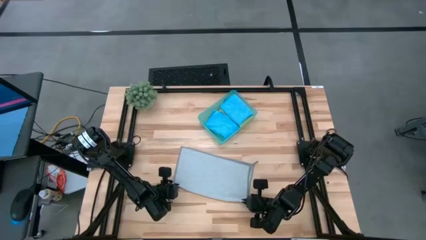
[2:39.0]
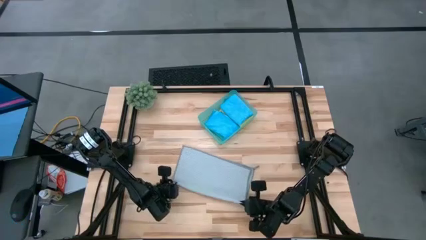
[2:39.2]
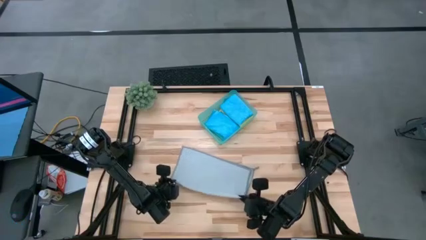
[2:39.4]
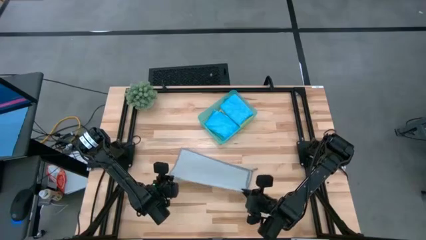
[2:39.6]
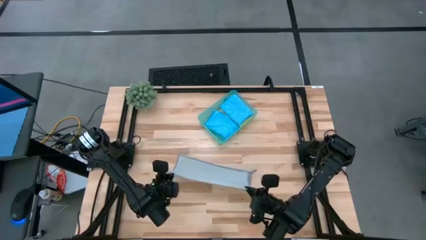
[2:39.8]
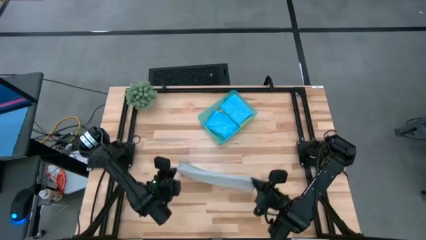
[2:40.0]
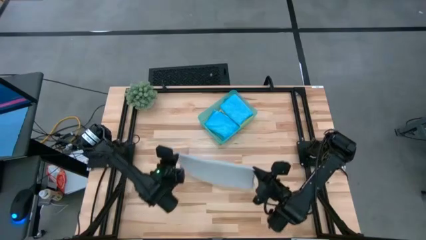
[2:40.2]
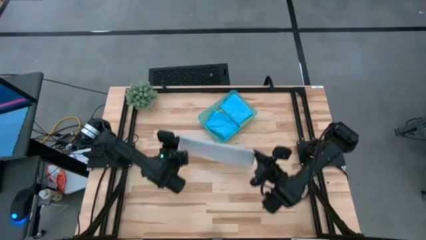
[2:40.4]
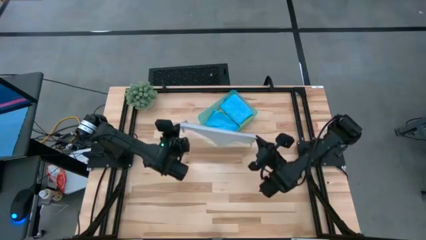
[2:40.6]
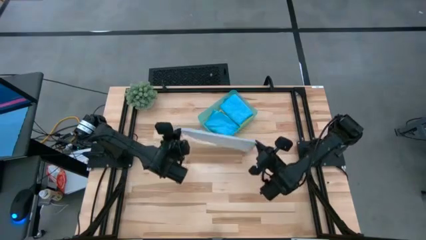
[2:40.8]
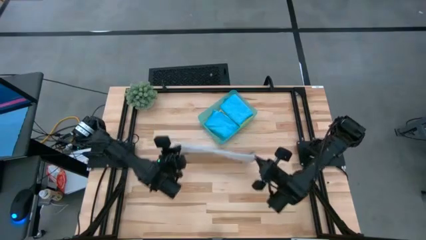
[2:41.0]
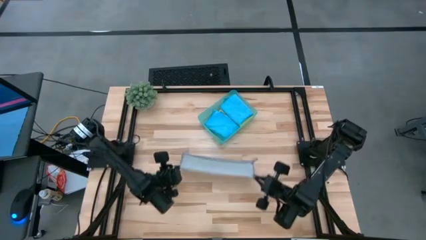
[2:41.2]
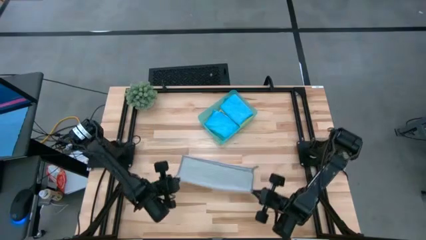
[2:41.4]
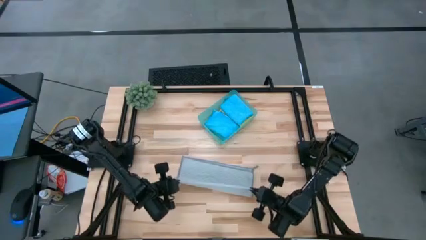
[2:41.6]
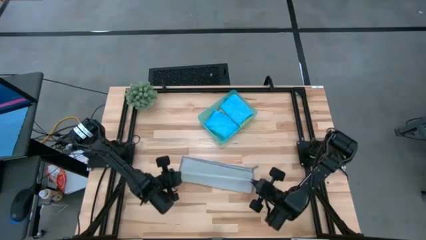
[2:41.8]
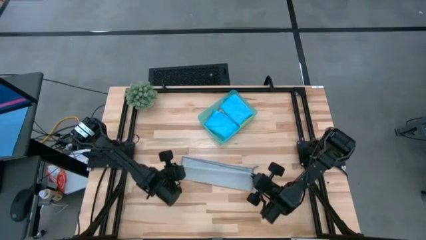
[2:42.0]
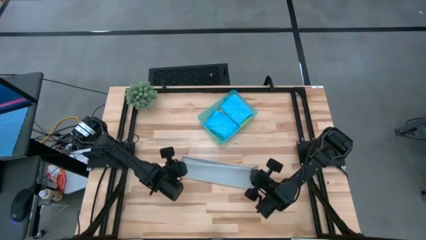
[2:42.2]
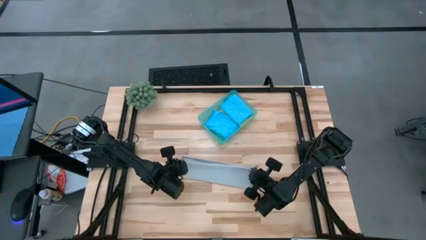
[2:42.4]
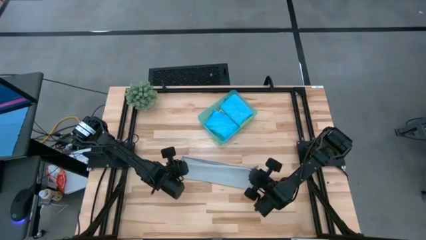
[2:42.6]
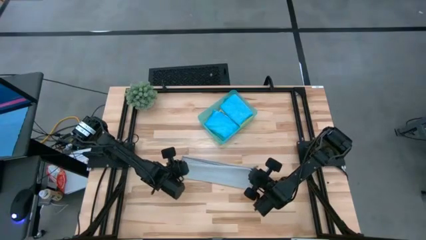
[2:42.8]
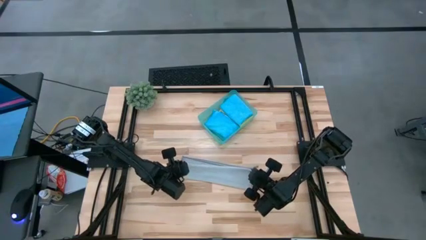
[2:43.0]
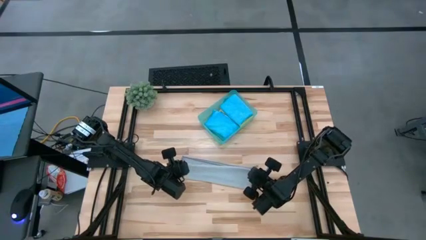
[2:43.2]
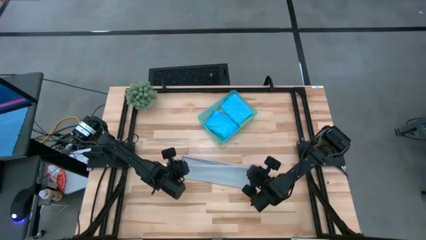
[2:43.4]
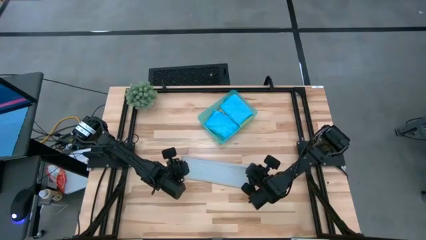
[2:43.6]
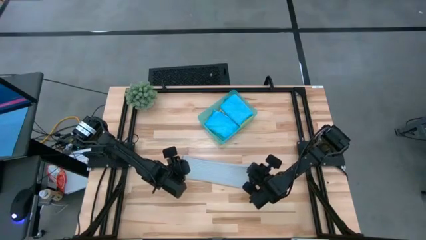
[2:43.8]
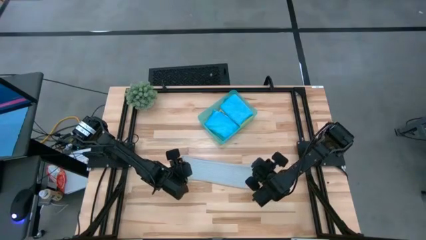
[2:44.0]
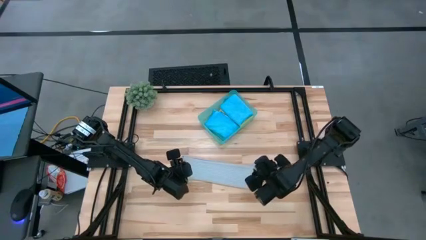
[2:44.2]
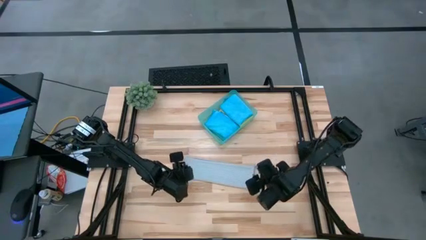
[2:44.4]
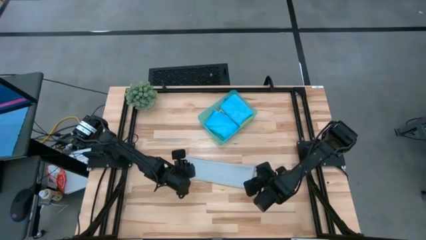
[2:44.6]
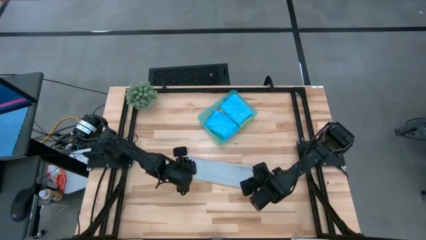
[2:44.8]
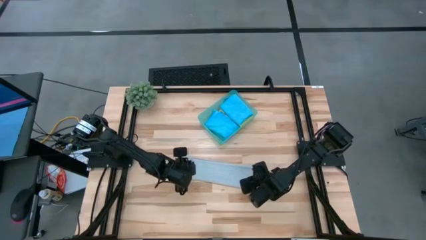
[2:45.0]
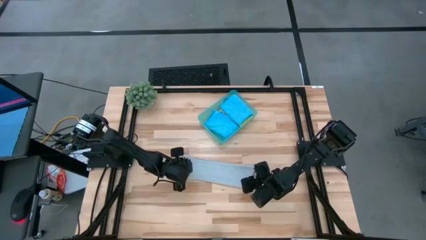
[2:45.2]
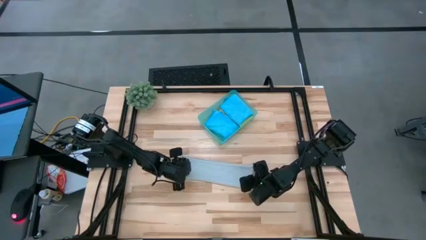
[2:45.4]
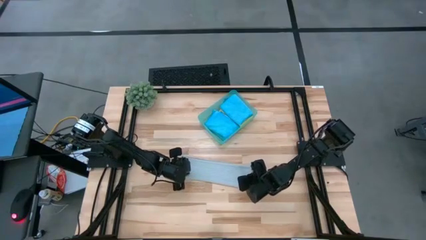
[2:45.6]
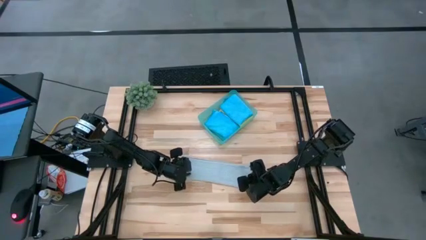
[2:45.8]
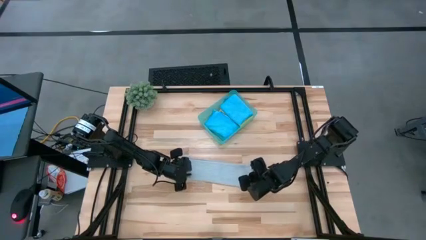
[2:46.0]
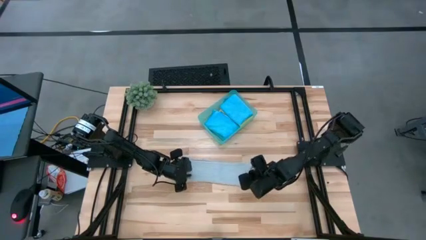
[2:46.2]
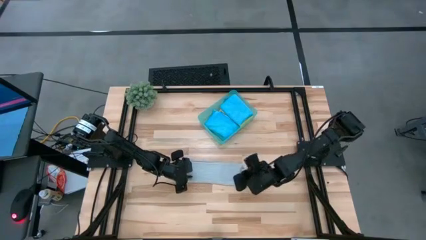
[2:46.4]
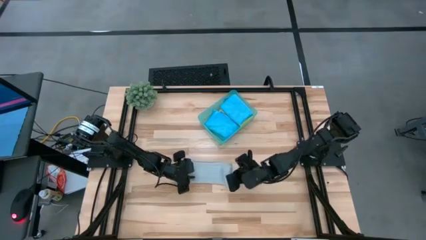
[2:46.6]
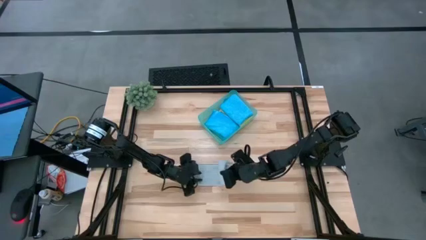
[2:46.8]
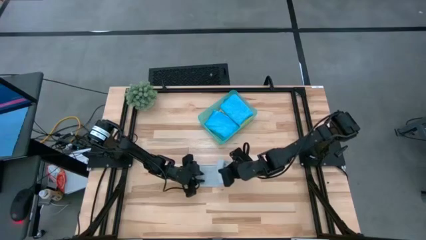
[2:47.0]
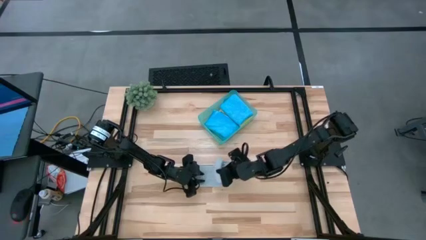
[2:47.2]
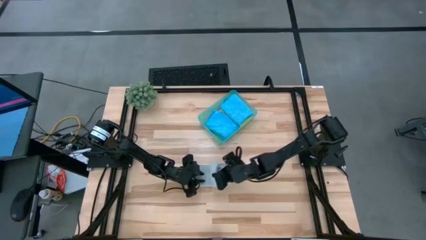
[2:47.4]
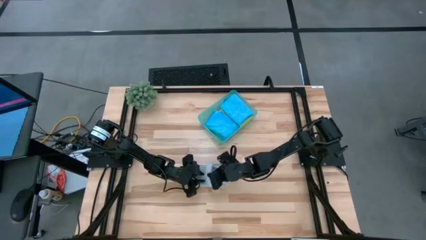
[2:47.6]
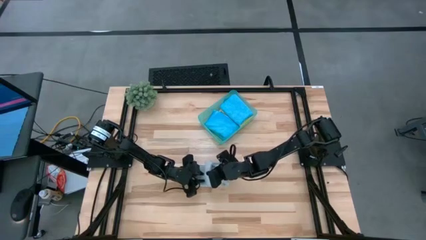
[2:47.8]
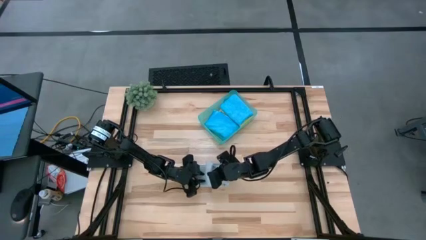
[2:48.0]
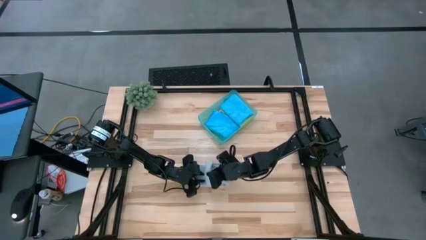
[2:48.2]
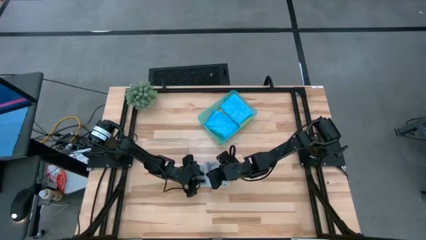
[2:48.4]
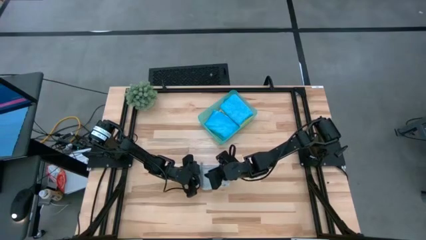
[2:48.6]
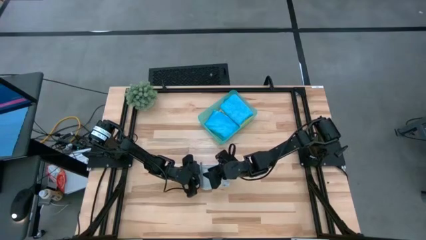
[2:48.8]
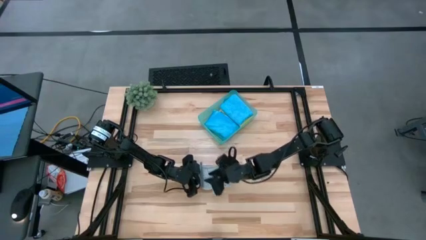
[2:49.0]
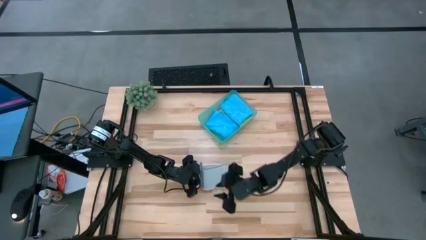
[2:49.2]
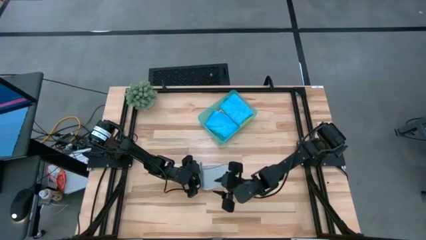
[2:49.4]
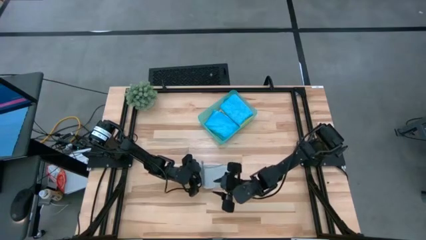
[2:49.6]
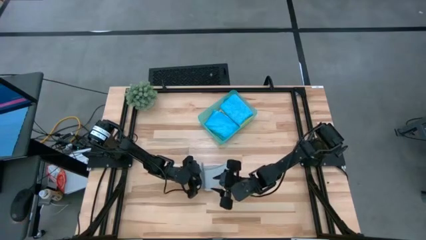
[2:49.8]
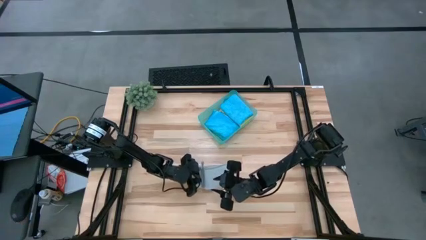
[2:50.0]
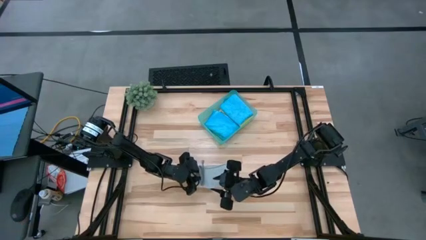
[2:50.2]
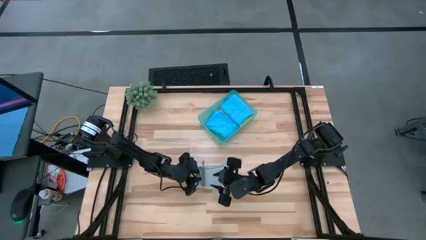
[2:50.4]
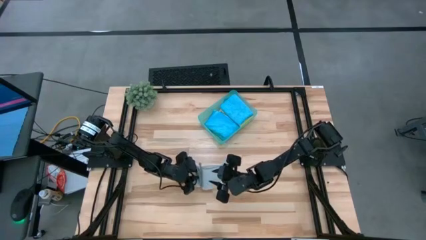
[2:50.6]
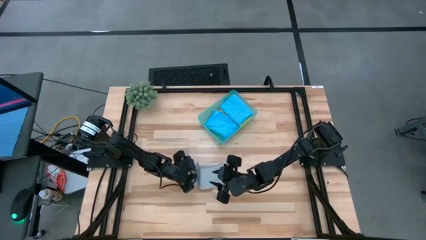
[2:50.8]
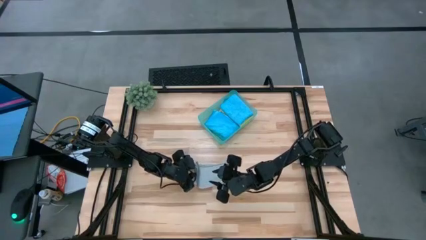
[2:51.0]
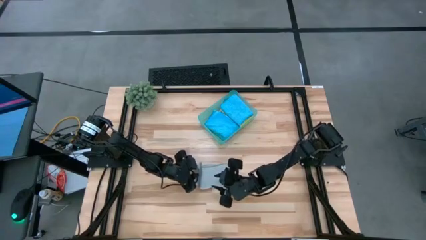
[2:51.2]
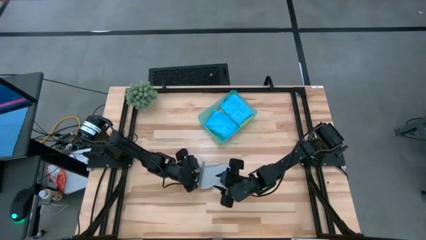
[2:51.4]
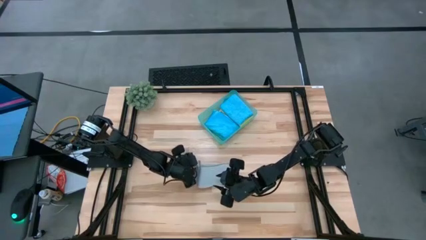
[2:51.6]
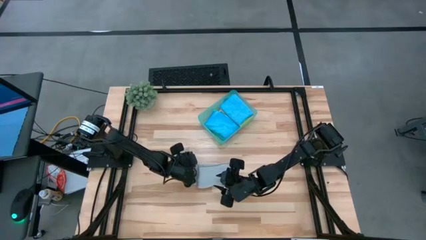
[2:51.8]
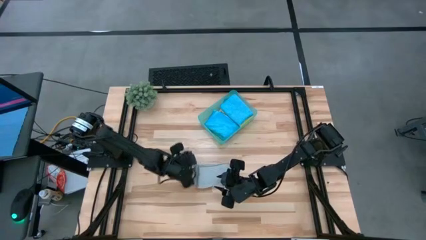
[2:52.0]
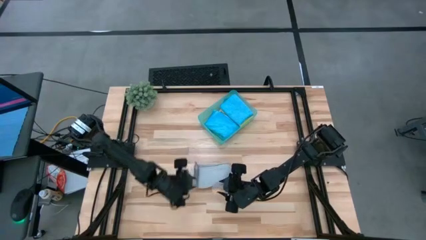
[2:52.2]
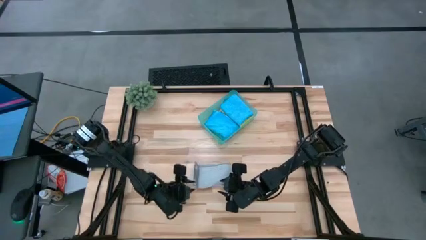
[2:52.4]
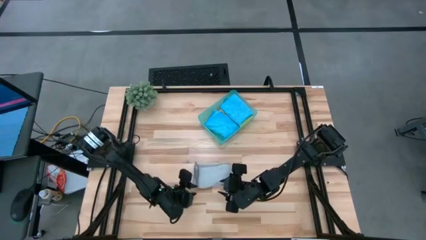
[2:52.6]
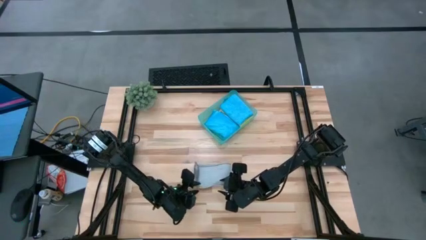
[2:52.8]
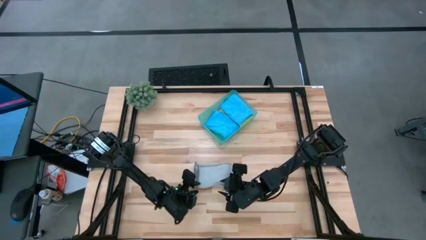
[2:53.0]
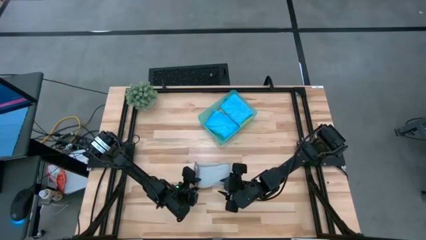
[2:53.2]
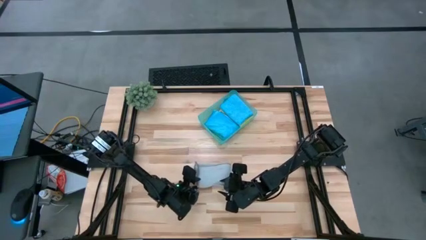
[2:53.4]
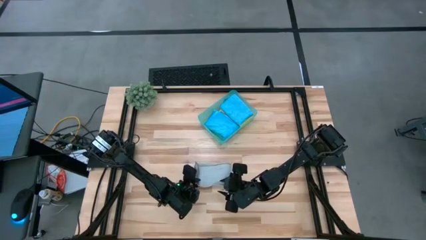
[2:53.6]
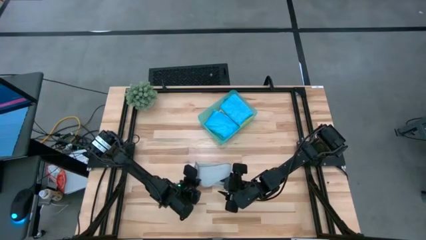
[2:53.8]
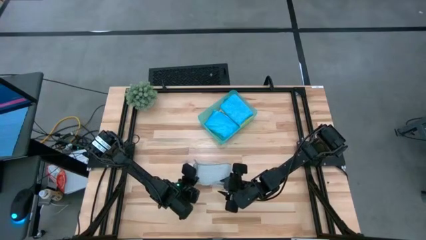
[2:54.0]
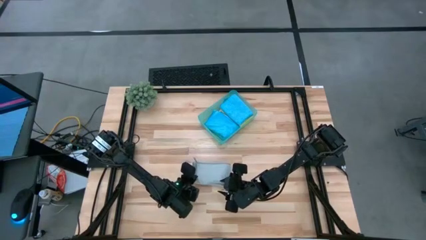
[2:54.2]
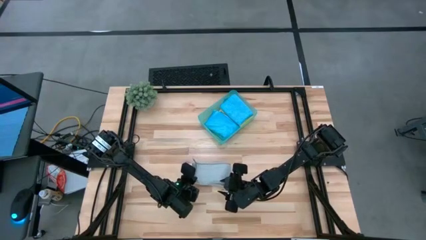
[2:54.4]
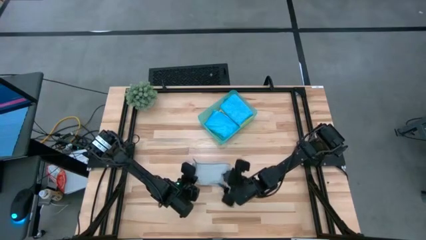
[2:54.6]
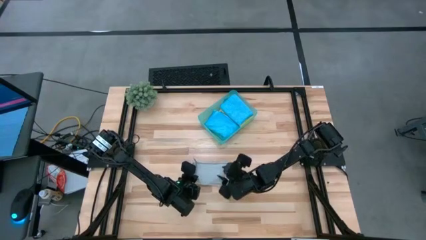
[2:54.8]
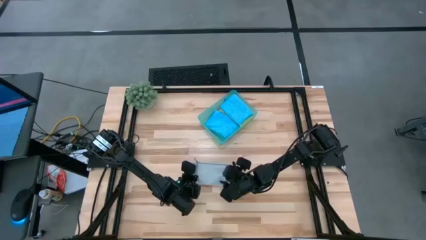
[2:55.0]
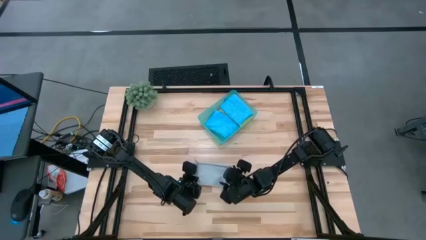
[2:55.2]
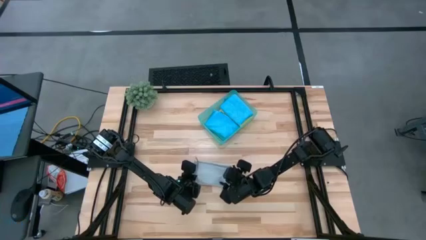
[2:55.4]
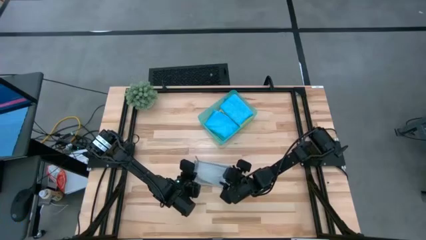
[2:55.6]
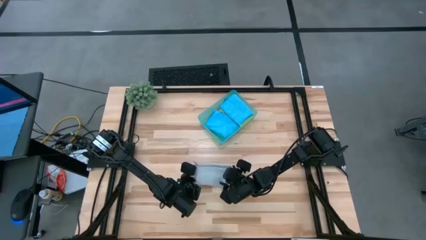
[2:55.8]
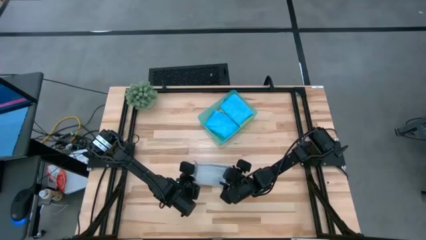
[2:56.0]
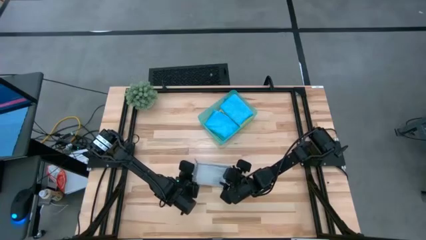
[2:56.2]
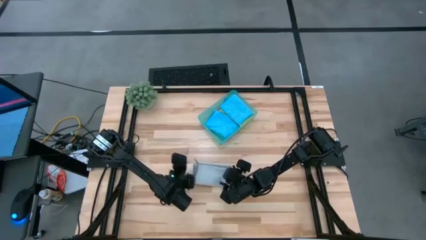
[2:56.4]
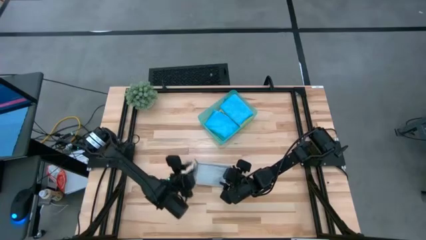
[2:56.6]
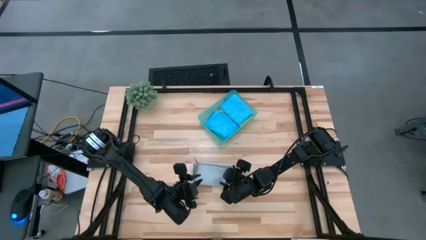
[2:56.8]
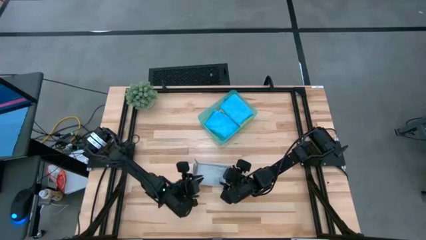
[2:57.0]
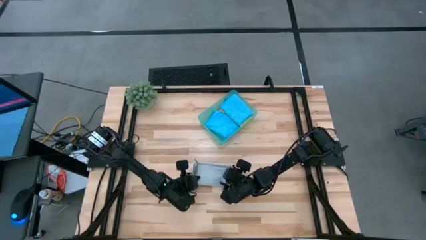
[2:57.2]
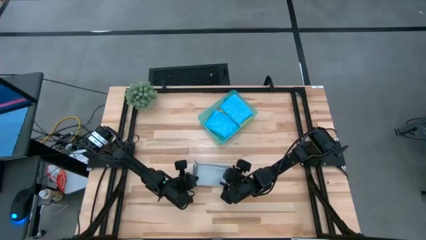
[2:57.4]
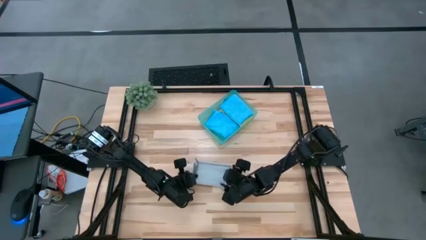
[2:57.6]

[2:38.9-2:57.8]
Task: Fold microfiber towels
Fold the gray microfiber towel
